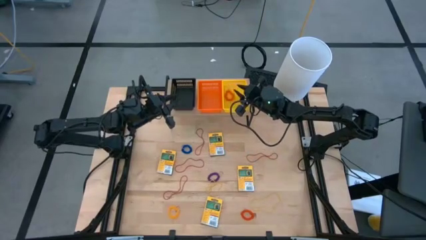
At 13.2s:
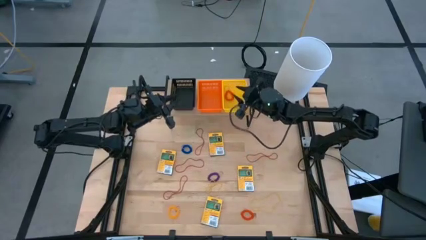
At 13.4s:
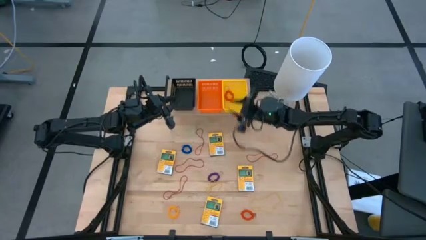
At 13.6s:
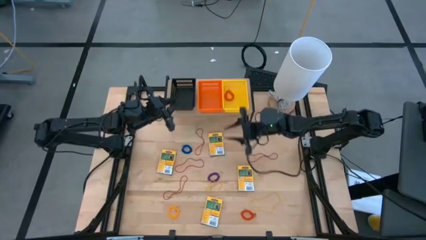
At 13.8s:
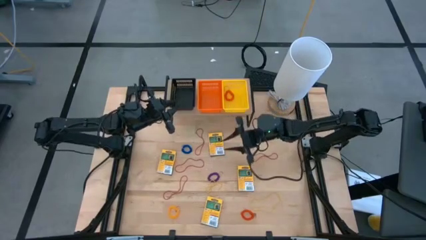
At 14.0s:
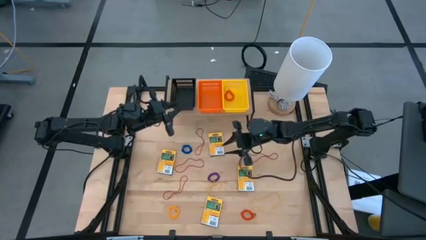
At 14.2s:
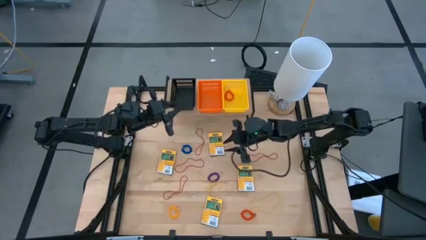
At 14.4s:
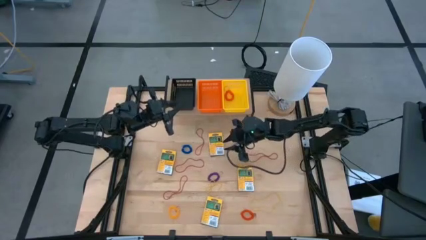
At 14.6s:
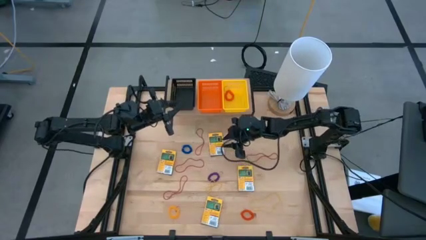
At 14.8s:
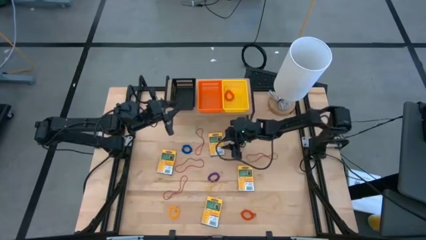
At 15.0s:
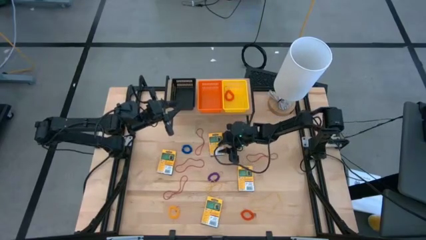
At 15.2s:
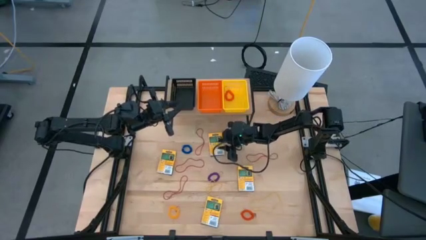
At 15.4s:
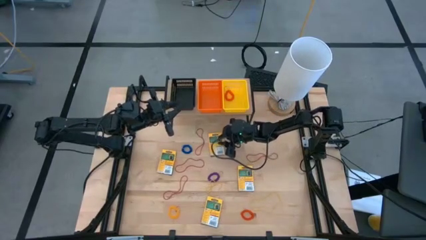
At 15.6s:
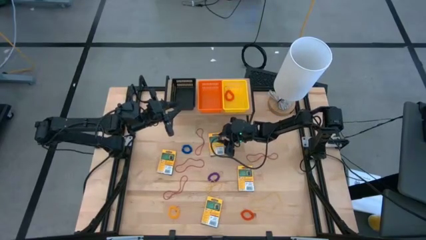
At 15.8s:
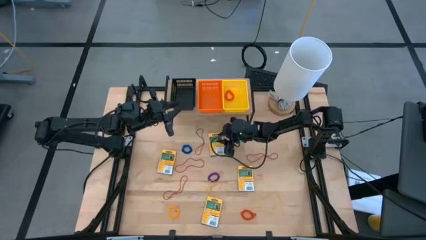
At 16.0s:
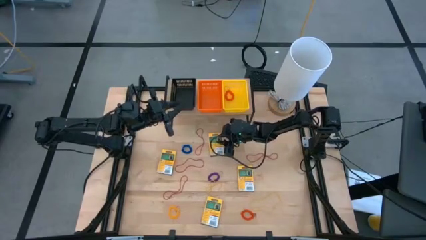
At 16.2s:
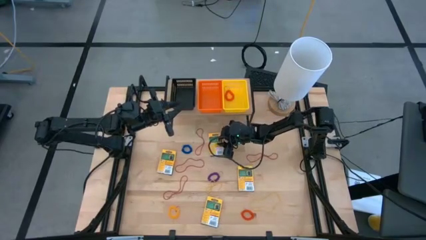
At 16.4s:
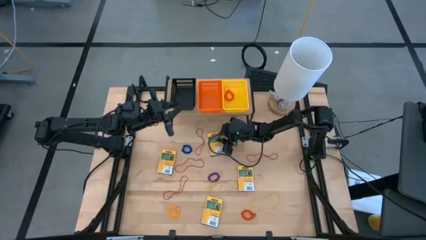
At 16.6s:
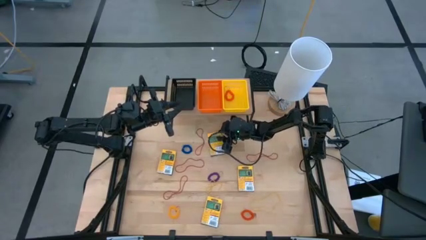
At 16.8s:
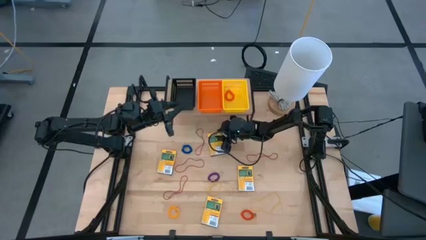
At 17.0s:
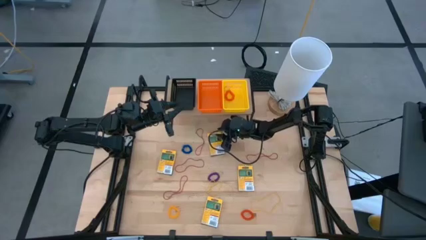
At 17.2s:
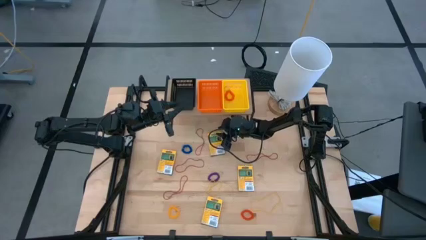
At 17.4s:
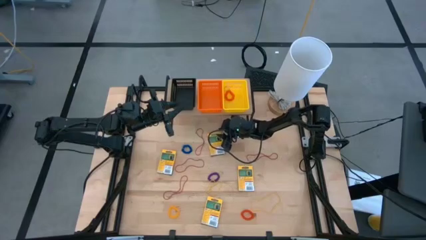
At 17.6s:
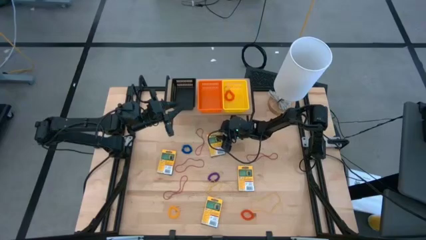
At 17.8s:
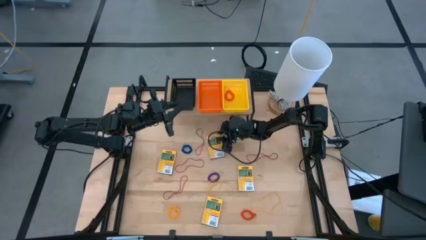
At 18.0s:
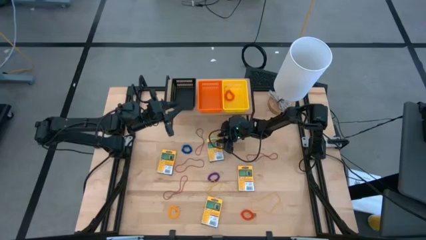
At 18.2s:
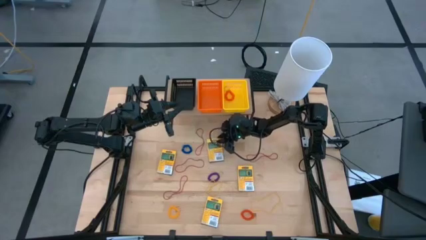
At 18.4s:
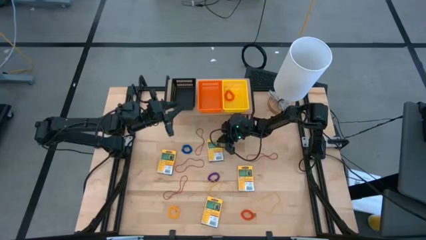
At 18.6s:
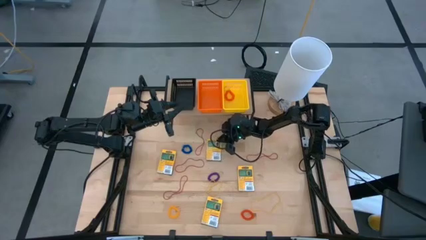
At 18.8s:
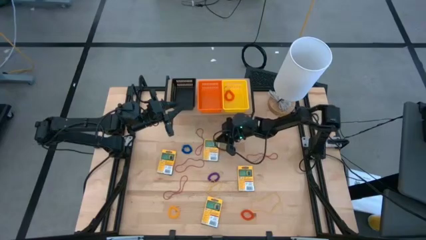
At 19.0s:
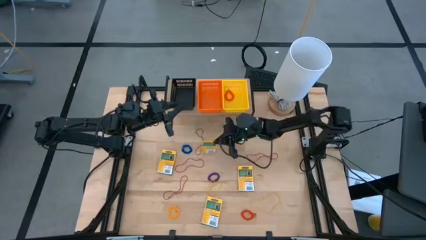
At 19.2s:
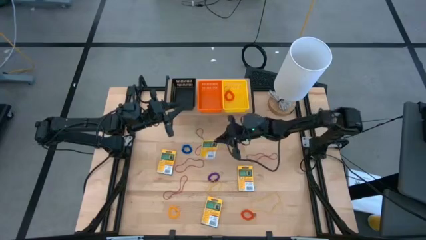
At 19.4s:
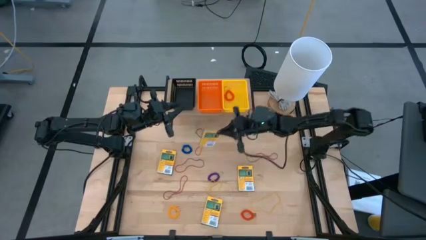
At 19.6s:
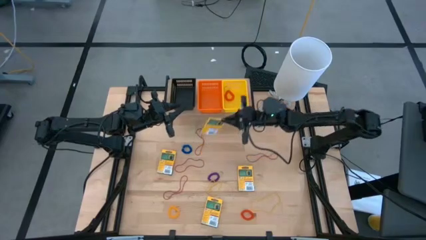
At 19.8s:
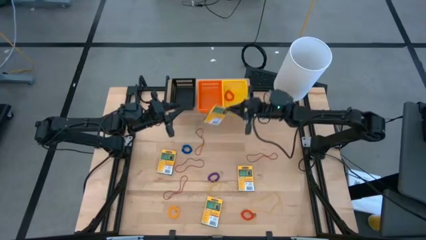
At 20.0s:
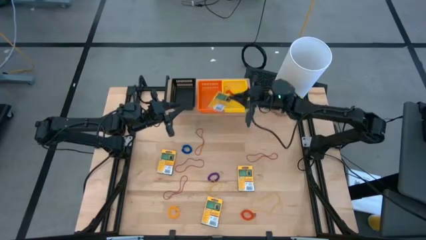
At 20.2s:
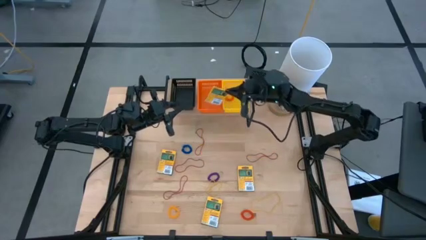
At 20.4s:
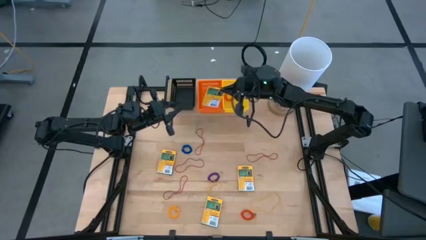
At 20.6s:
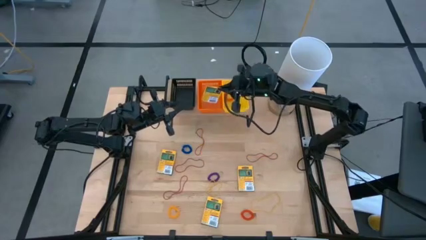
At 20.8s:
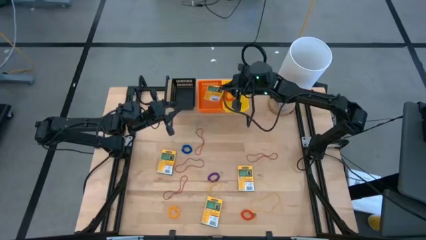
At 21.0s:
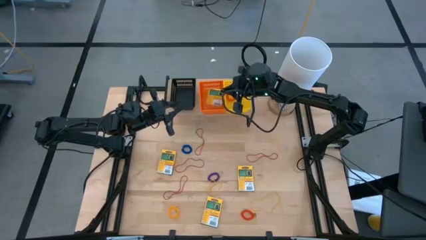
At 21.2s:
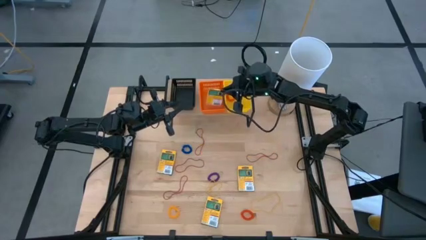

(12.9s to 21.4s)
Task: Pick & Place Office Desk Supplies
Put the yellow crayon box into the orange bin on the shelf

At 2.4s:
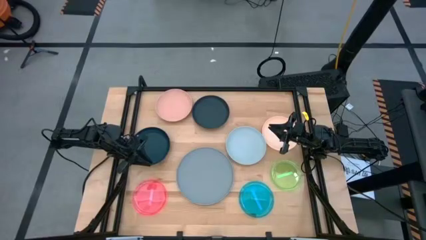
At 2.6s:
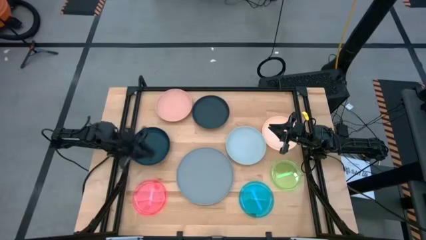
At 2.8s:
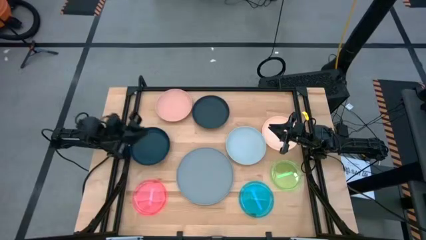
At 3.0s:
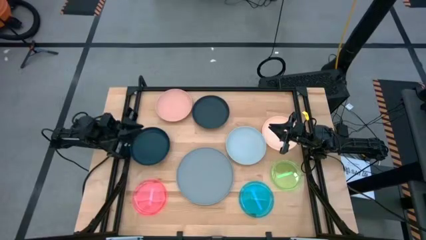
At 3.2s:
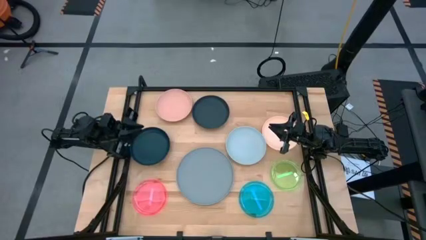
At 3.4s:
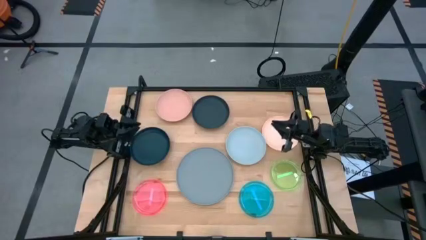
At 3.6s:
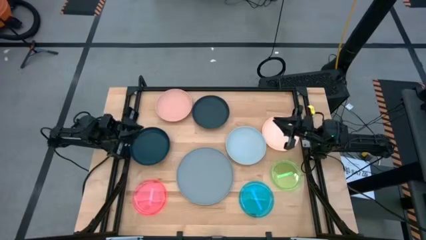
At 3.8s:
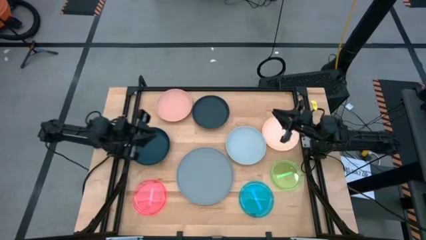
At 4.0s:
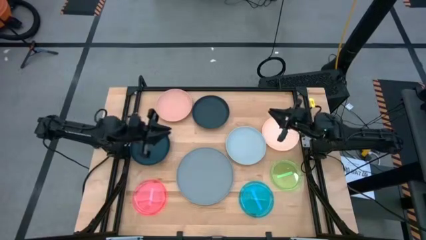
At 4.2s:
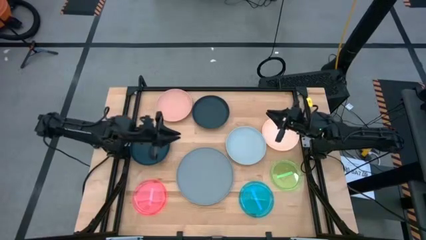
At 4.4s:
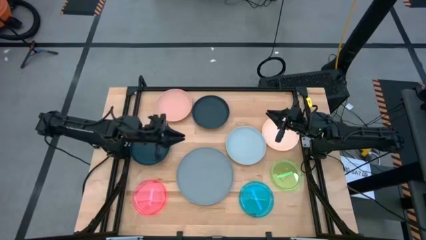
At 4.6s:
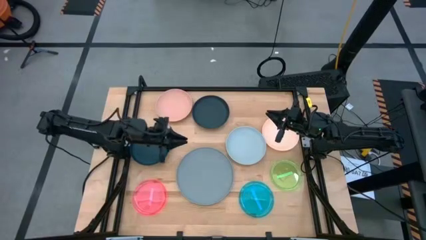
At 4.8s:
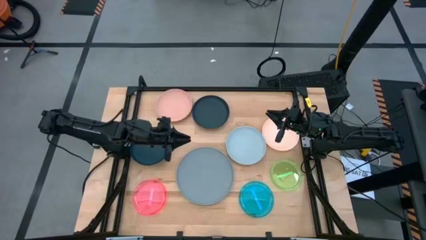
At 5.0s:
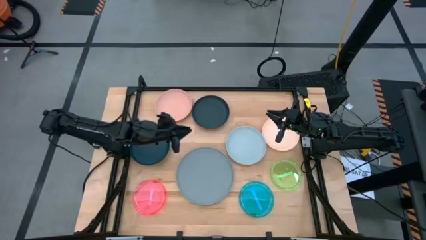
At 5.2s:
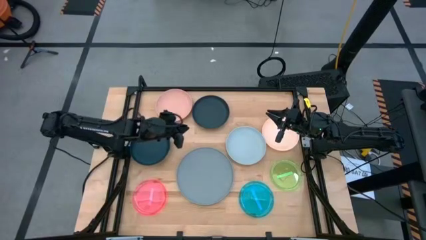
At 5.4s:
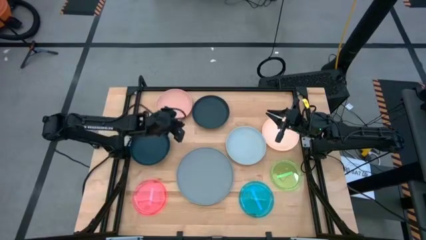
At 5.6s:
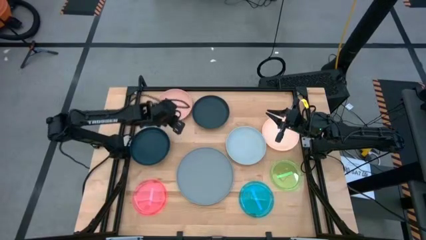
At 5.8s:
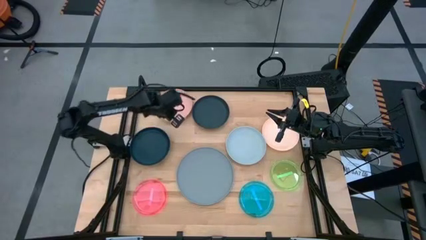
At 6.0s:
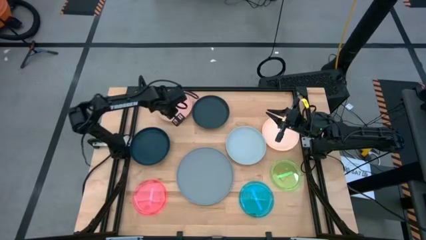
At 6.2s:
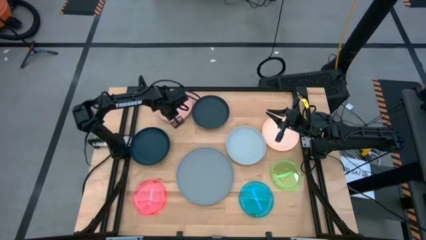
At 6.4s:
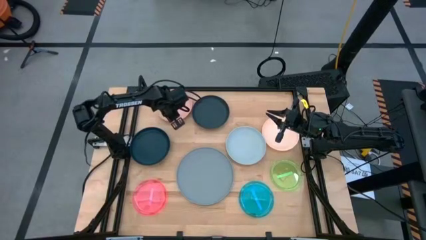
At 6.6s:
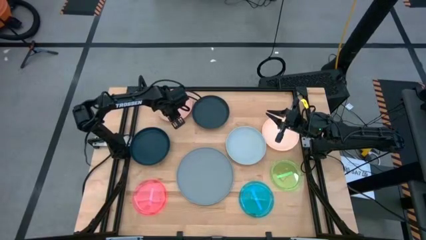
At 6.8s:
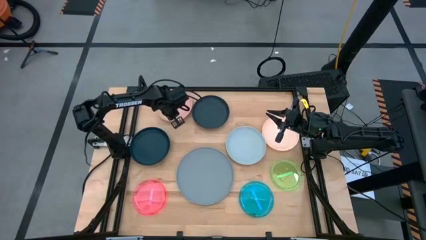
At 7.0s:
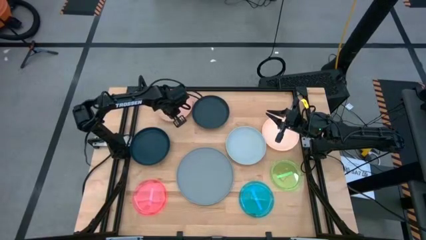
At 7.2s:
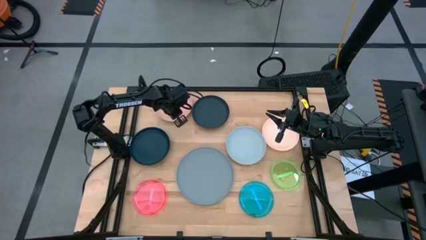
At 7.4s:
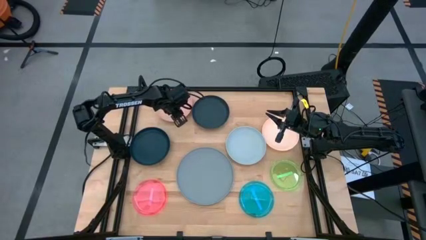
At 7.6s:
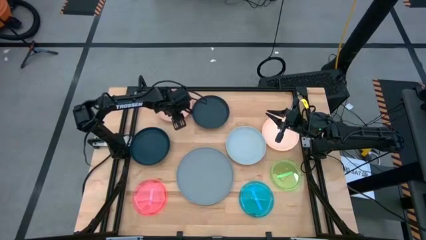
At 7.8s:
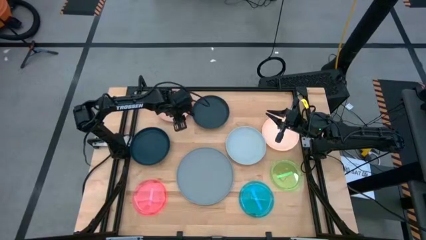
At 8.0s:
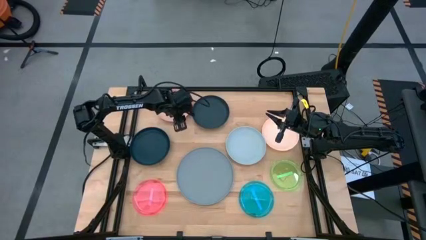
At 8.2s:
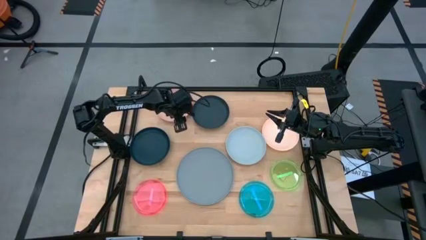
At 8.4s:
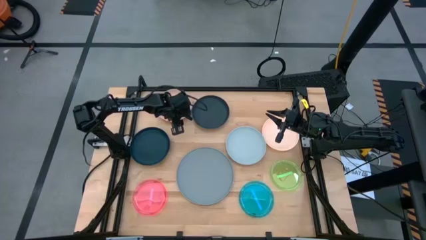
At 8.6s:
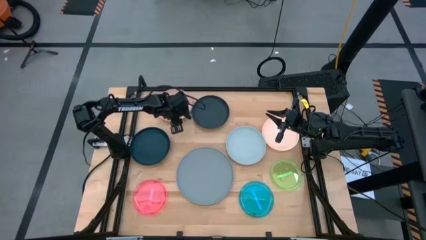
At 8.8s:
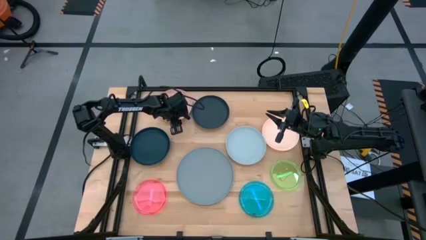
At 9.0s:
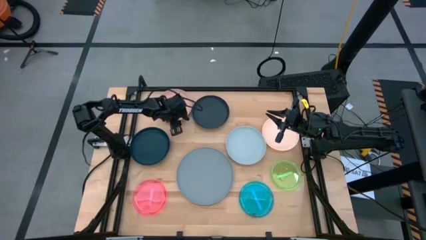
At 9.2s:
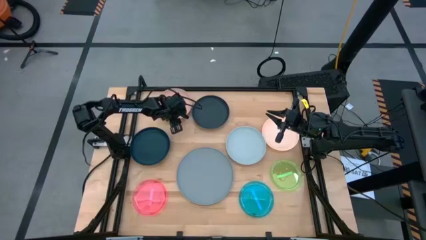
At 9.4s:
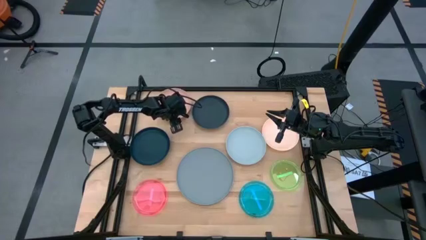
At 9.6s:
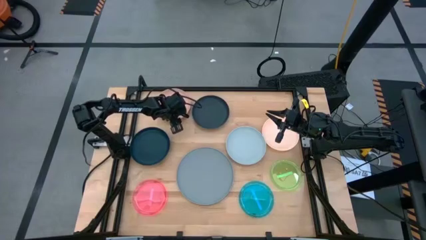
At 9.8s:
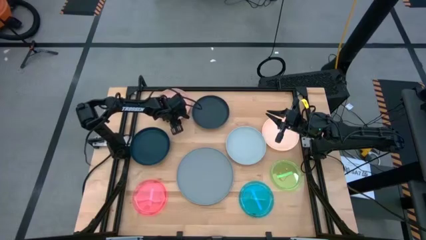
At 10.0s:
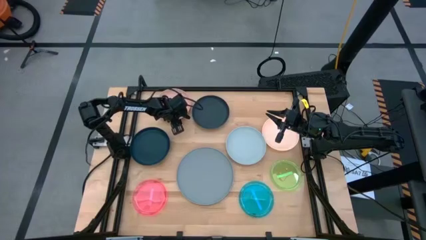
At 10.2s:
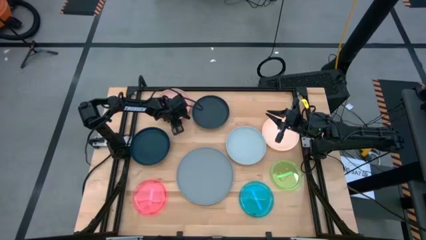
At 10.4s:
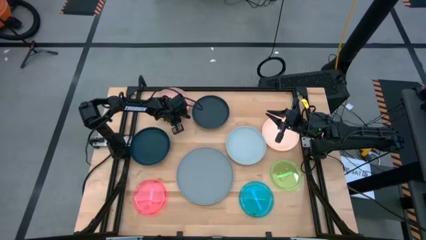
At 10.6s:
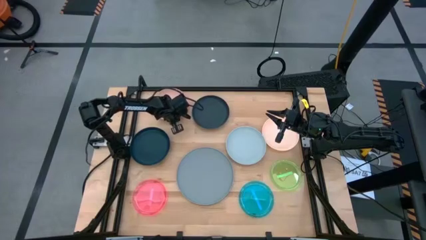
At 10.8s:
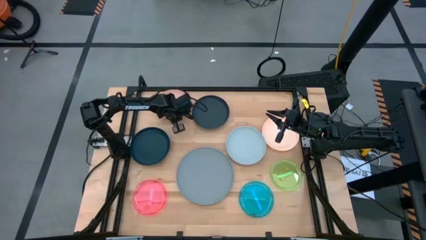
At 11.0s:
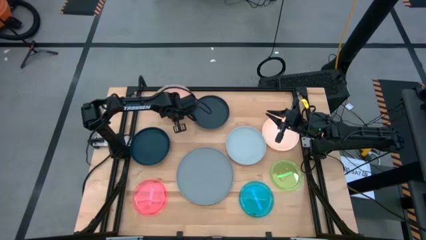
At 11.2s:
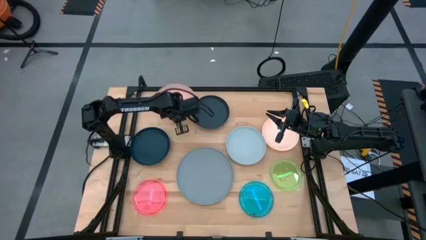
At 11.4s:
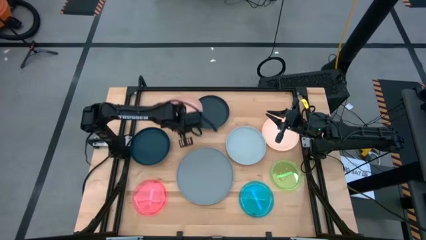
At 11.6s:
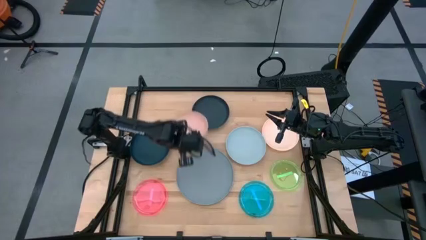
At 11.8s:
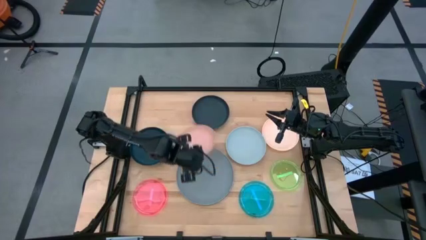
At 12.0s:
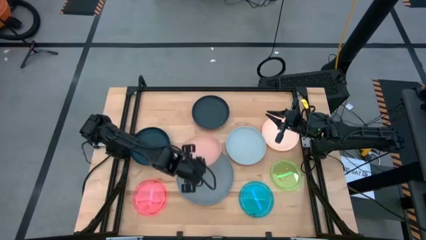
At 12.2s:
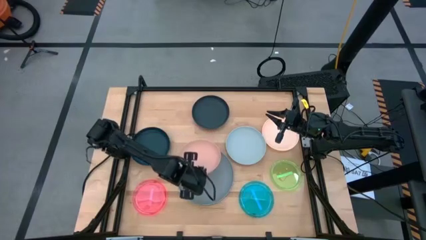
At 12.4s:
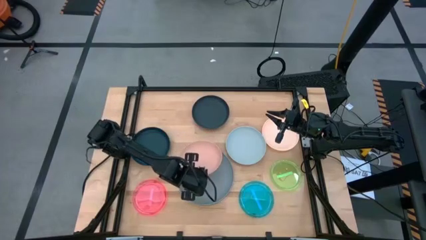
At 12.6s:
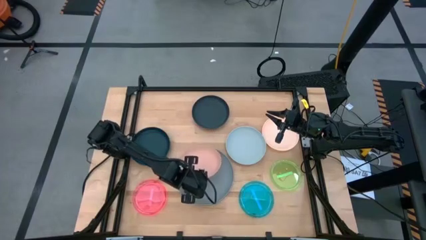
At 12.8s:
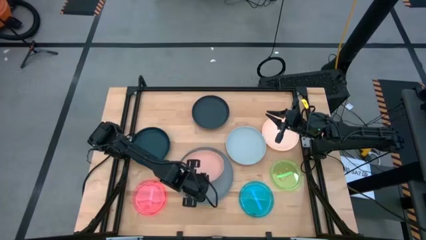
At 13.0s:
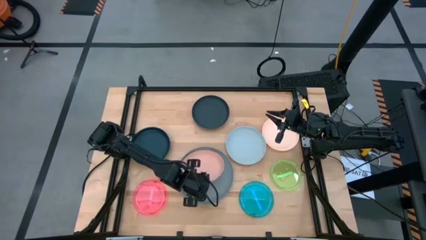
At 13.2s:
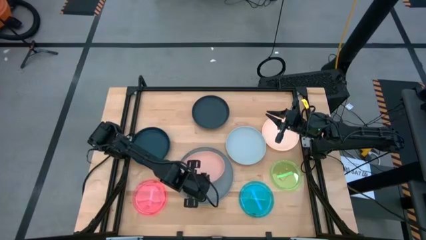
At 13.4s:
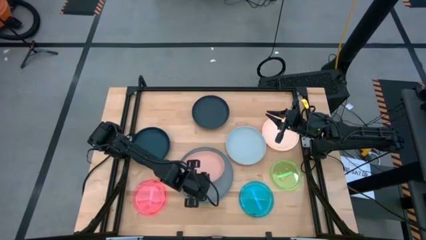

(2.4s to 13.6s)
Task: Stack plastic plates
Stack the light plate on top of the gray plate
